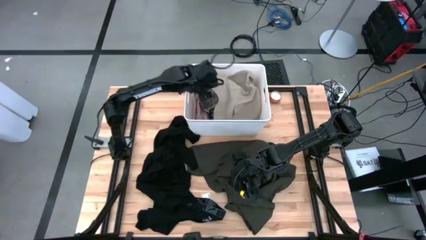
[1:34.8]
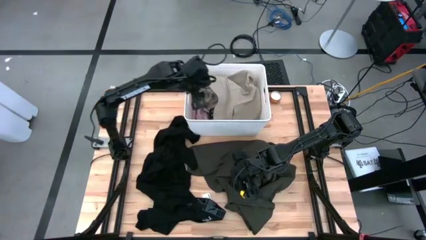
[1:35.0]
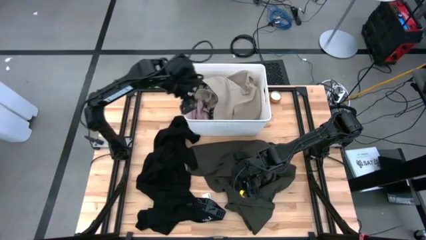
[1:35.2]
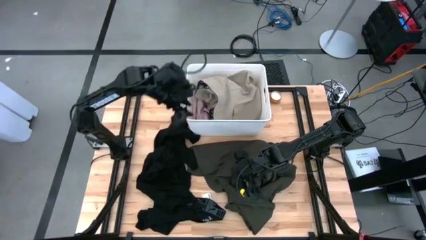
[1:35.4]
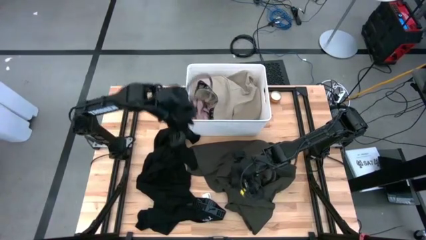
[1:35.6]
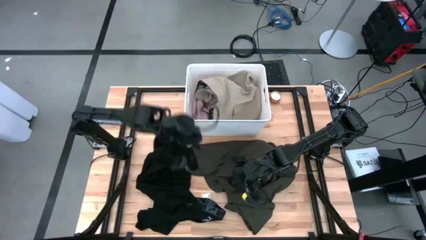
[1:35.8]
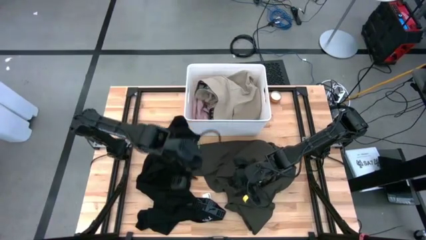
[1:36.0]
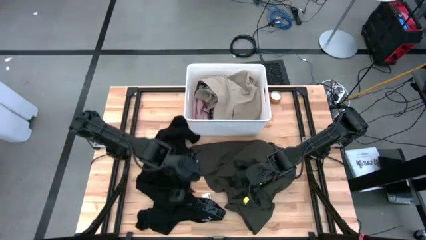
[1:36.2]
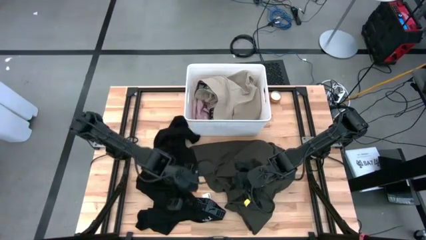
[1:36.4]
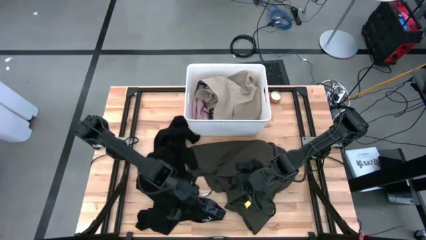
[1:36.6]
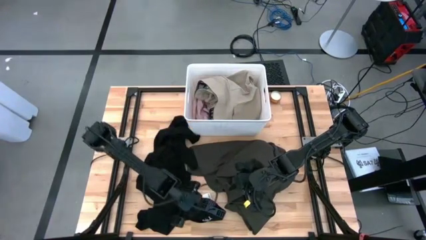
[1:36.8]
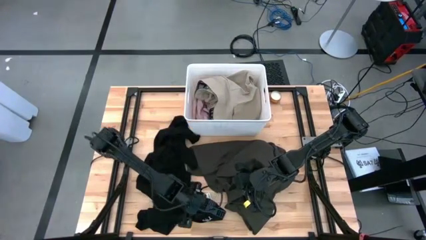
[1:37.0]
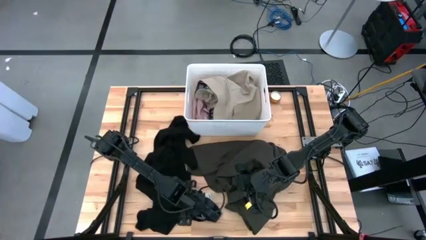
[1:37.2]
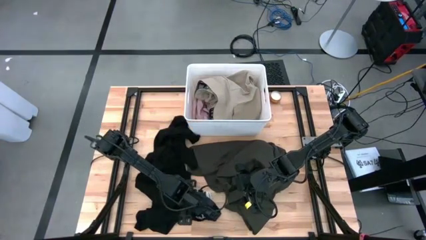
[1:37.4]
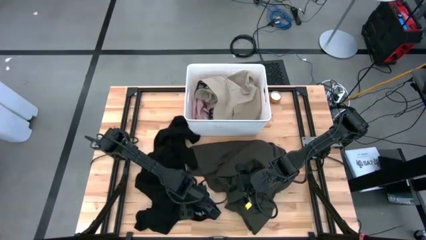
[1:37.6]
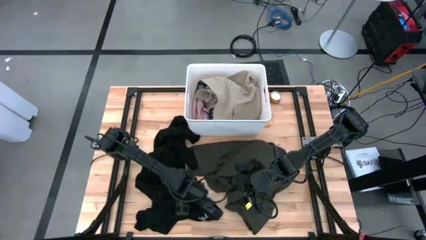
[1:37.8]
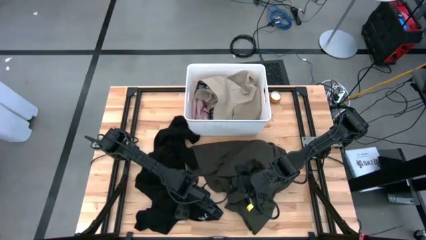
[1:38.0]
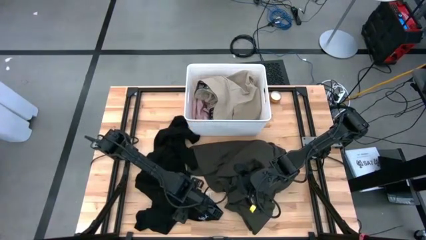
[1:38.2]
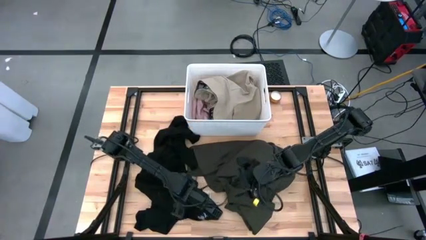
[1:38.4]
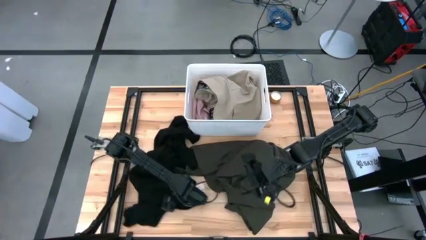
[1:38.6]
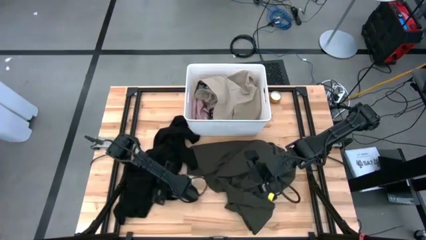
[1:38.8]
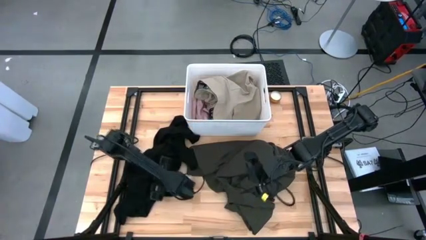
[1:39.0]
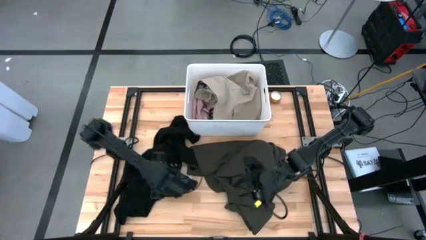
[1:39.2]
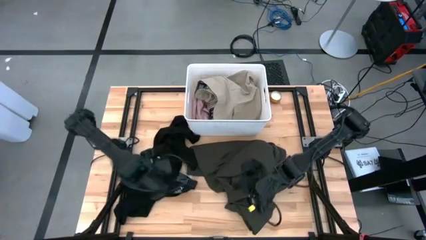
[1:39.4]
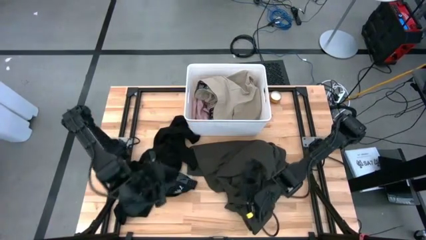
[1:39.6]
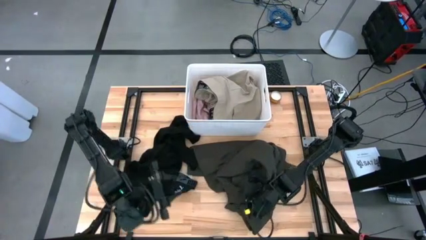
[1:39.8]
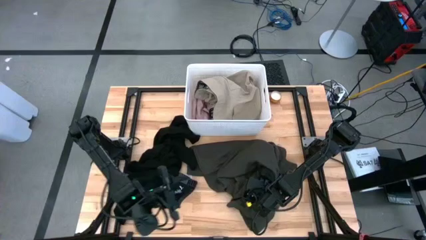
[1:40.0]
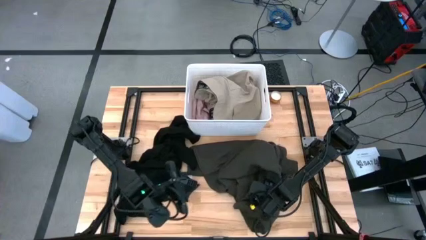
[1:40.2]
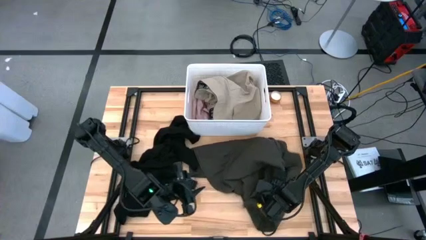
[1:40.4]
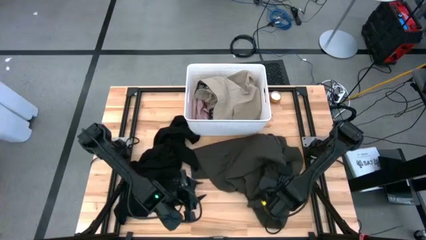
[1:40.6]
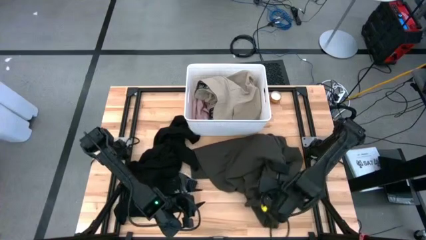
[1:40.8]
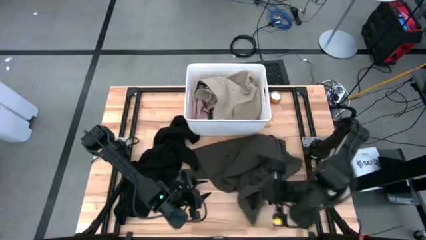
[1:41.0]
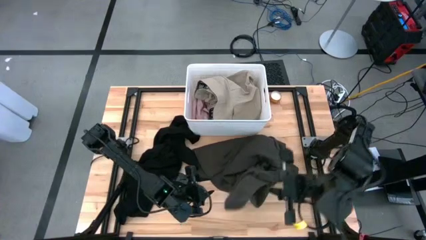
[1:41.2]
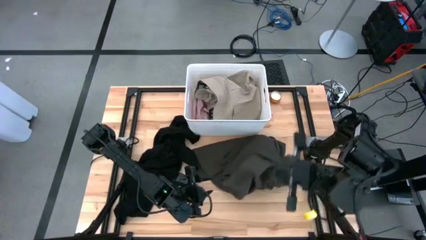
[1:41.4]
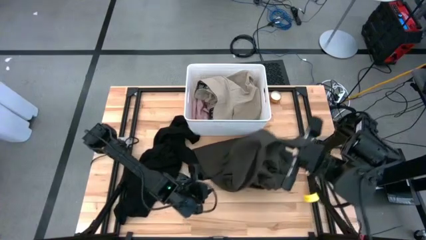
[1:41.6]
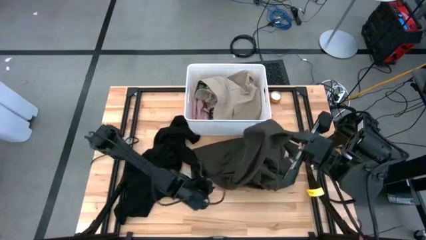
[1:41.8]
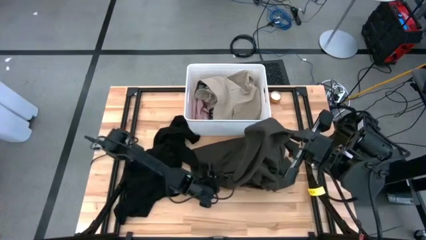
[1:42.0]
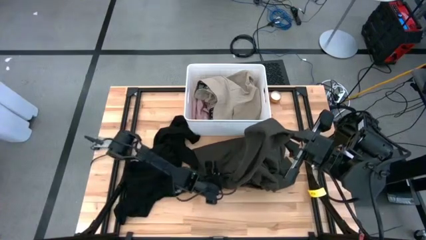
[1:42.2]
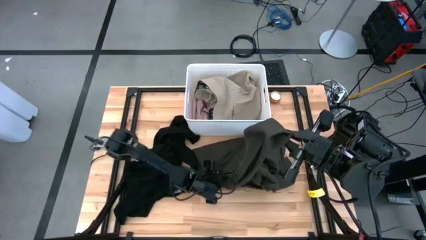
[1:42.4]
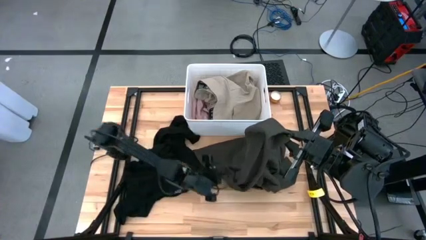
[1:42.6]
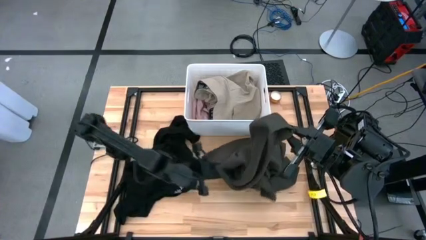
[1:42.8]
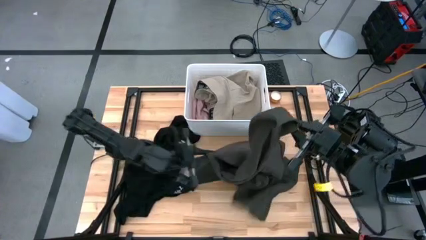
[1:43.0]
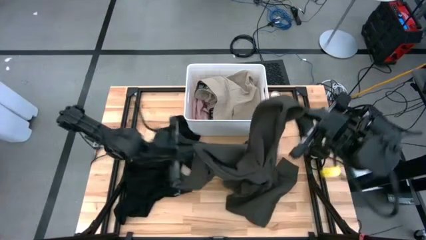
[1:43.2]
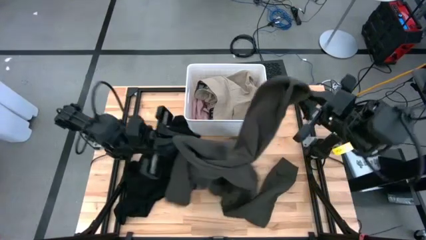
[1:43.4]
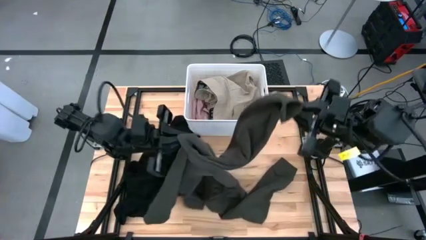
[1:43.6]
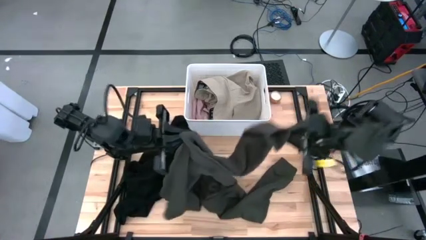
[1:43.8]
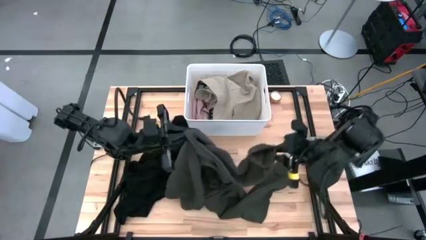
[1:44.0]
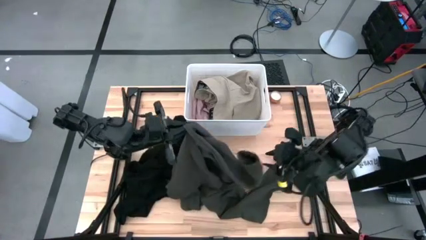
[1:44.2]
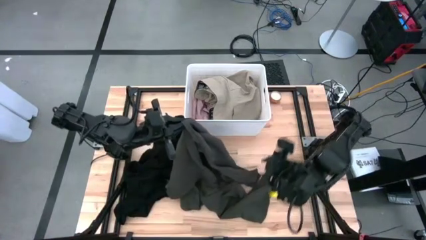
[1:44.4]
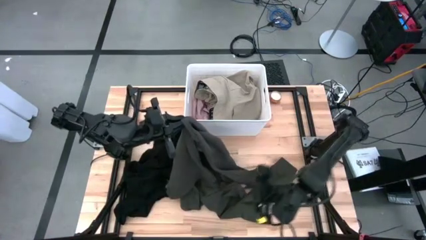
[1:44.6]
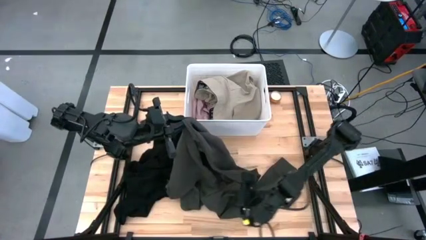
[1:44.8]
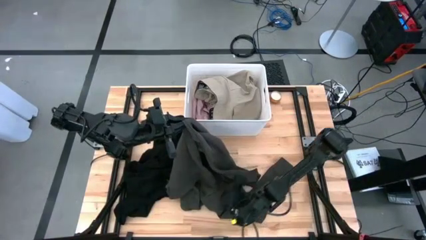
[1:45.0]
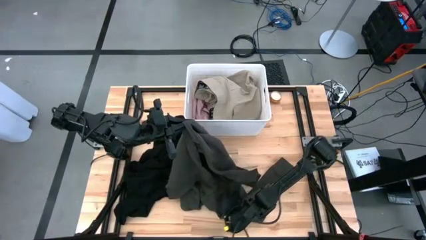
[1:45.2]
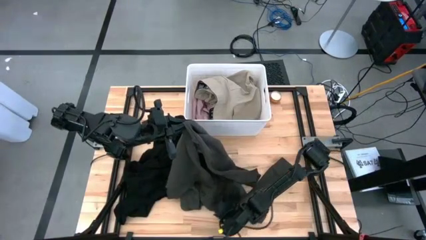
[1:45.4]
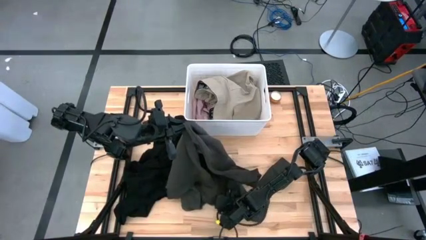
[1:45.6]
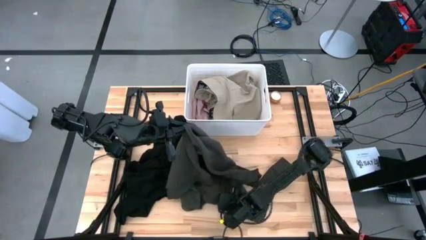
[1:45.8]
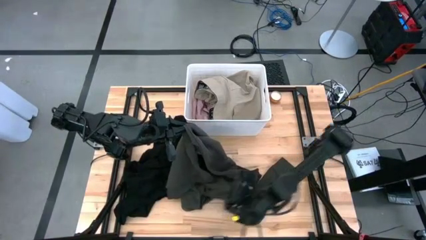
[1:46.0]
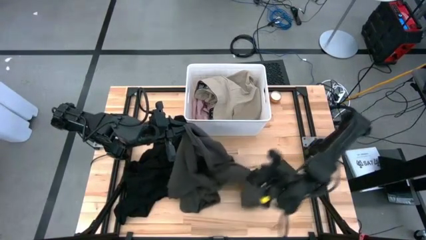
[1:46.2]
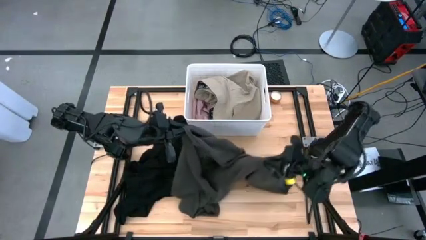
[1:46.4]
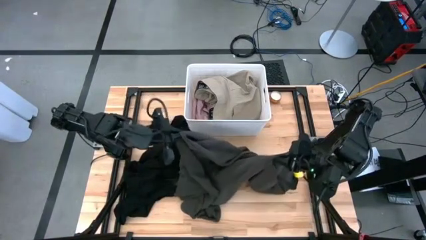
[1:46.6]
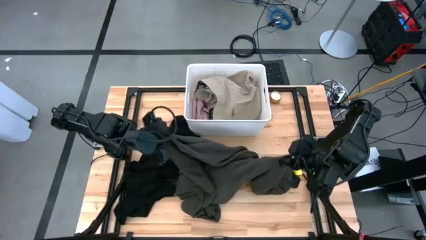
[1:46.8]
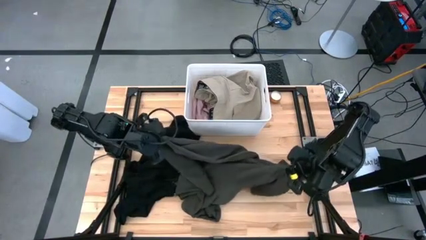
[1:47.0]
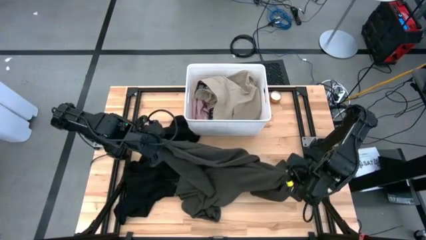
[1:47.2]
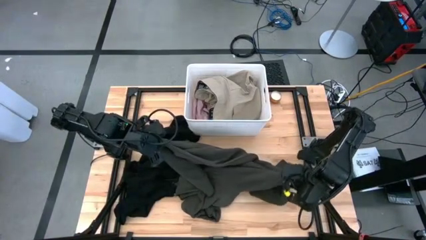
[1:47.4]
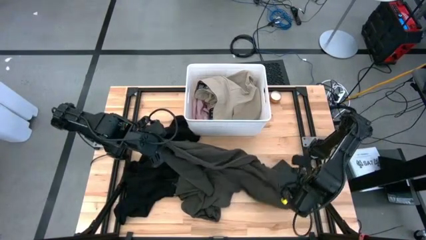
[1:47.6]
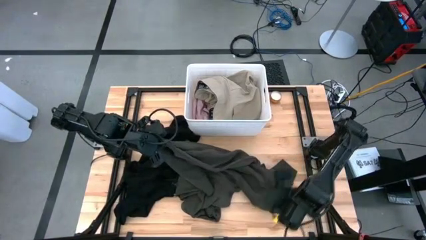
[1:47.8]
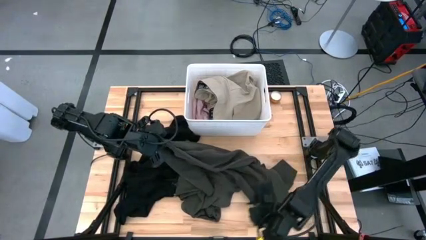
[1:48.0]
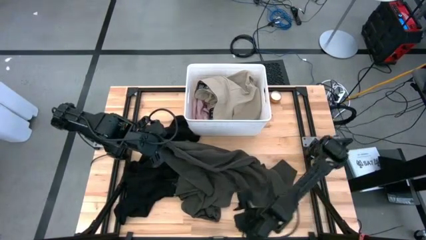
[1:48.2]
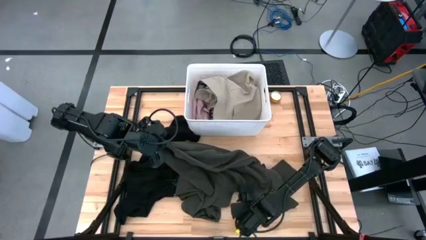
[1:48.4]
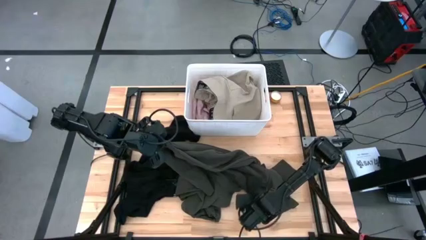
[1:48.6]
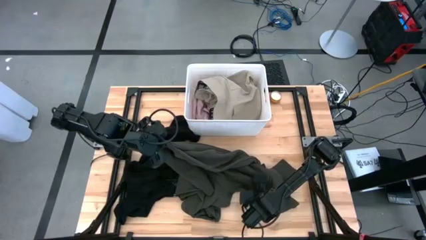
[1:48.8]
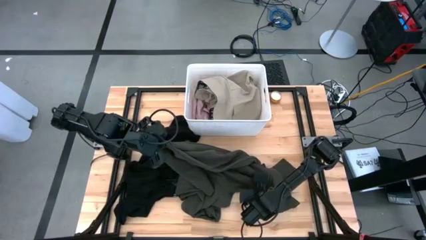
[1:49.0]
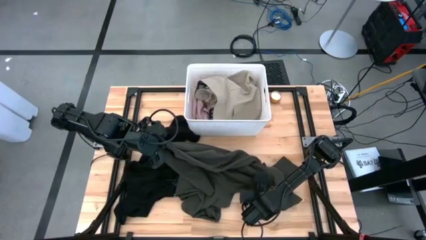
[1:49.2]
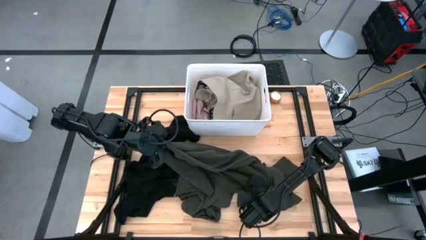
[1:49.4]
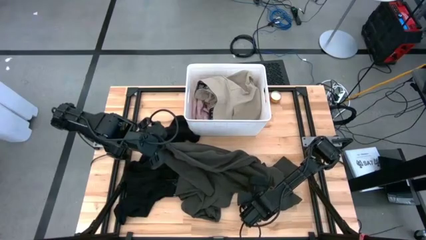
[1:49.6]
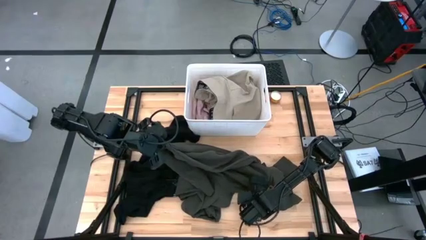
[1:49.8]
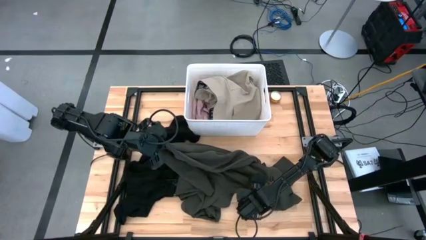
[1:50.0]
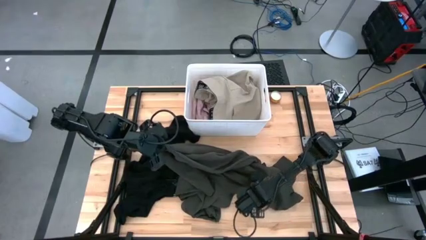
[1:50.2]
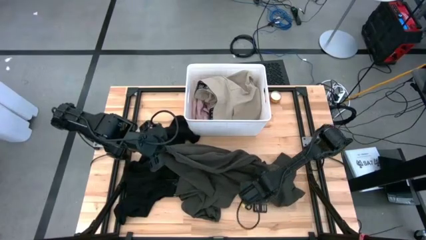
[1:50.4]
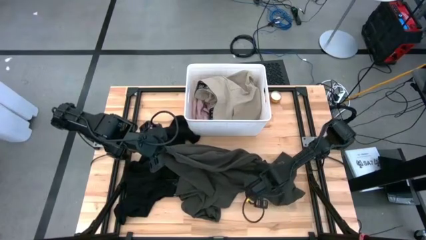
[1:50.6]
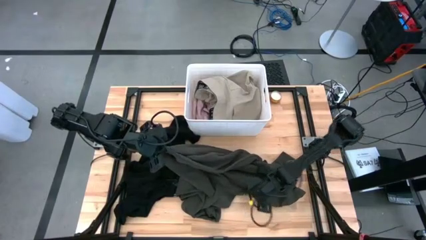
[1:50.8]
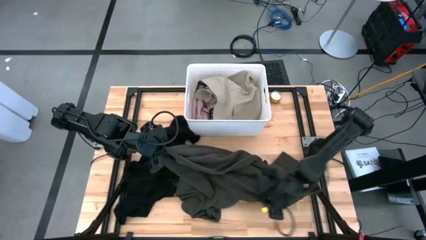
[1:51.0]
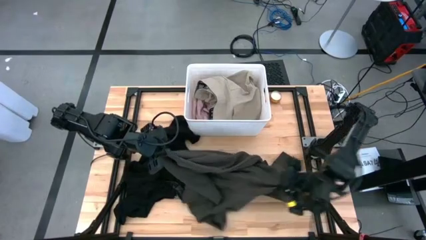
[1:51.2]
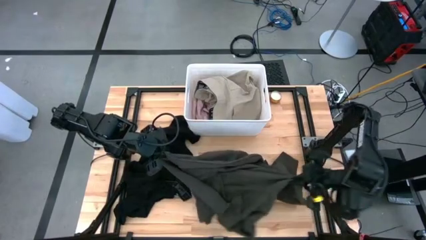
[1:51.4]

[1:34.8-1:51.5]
Task: Sort clothes
Put the gray hoodie into the white bin
